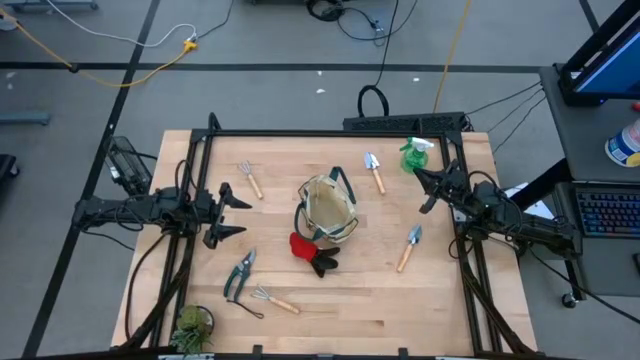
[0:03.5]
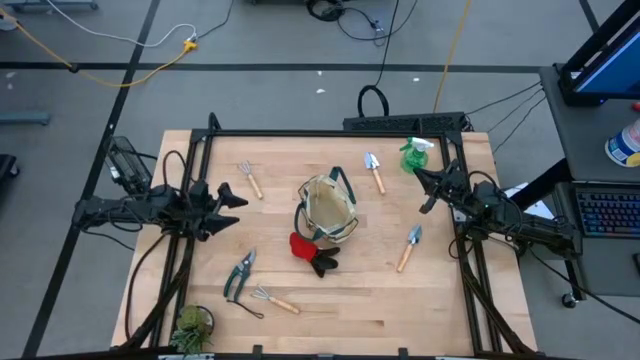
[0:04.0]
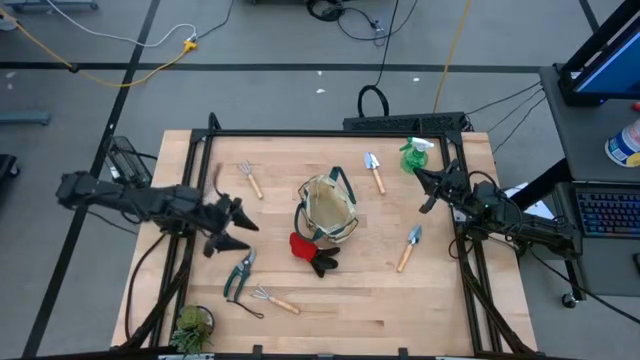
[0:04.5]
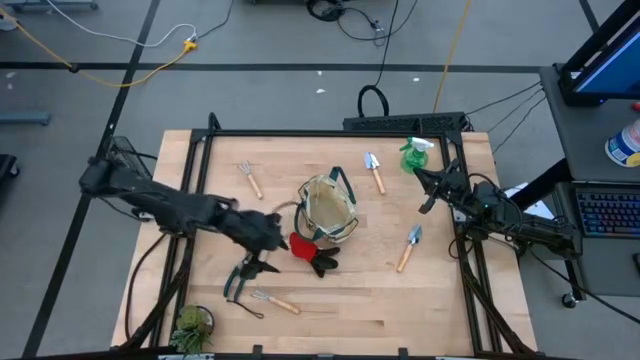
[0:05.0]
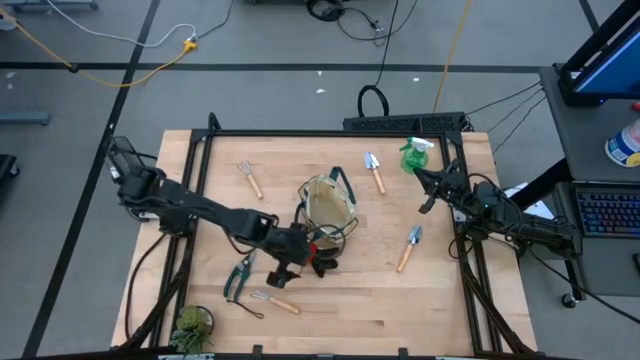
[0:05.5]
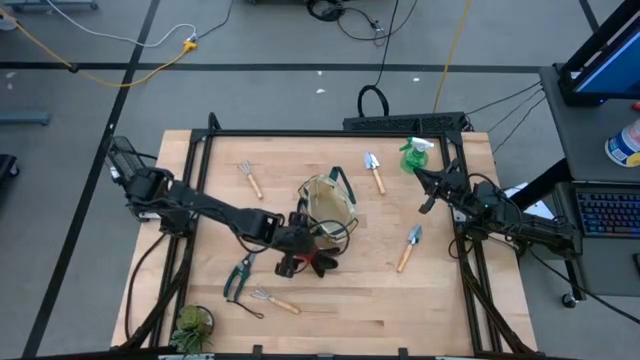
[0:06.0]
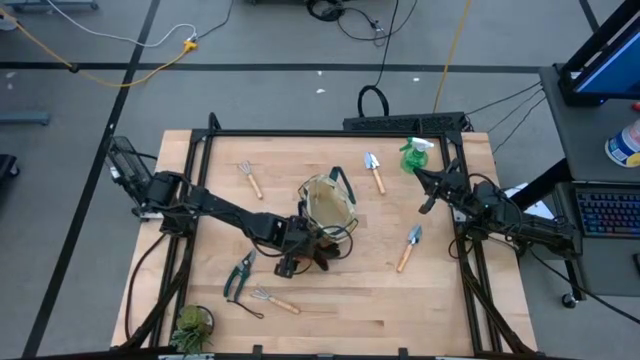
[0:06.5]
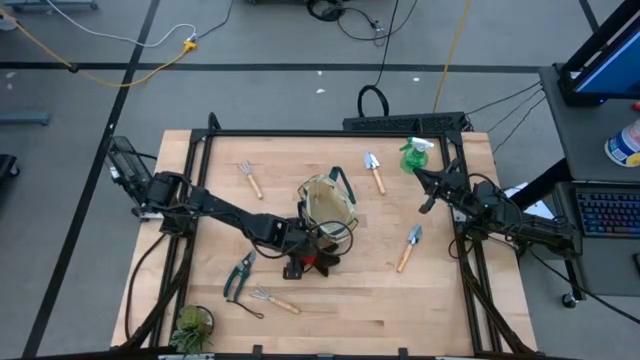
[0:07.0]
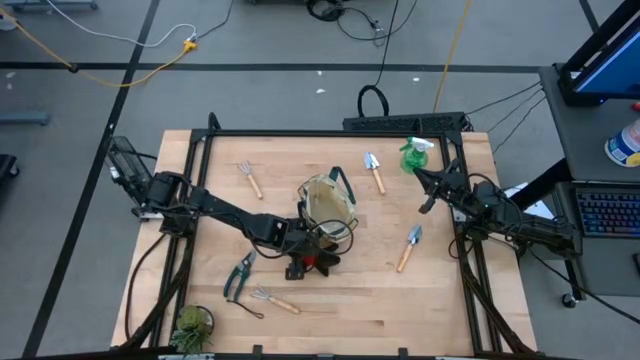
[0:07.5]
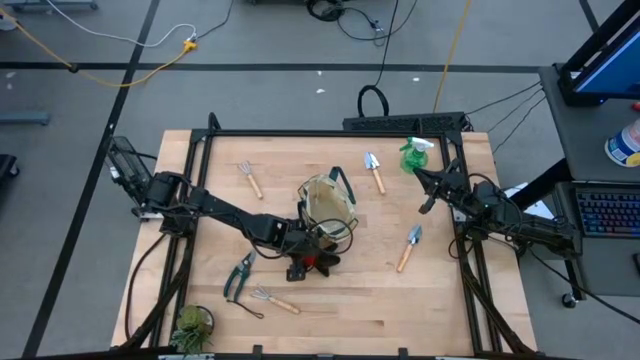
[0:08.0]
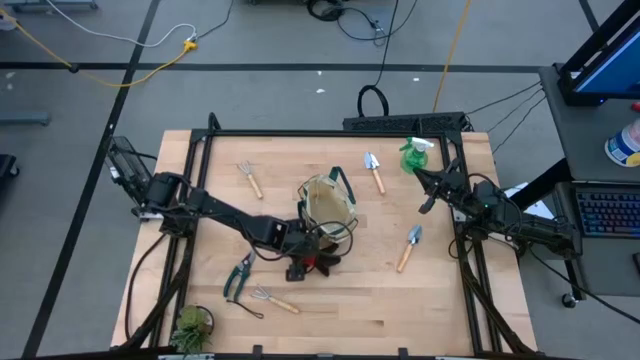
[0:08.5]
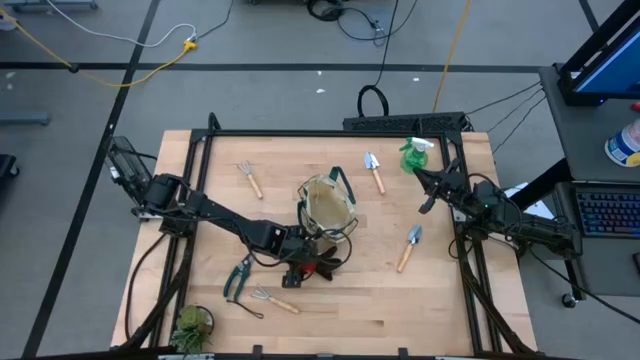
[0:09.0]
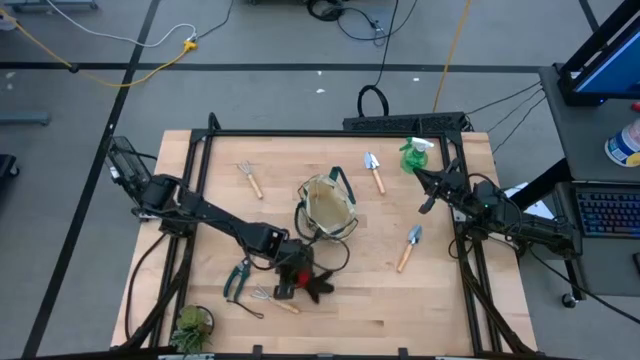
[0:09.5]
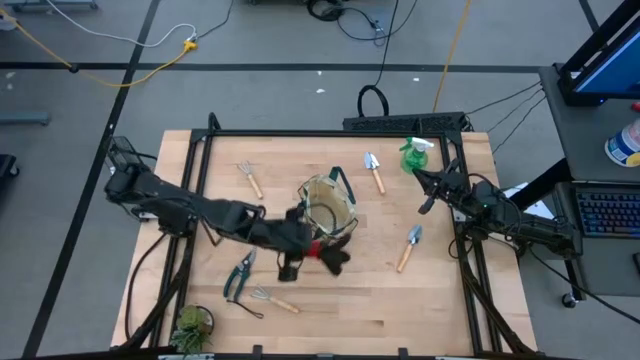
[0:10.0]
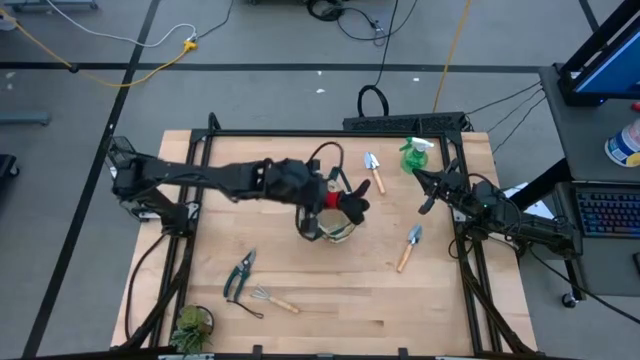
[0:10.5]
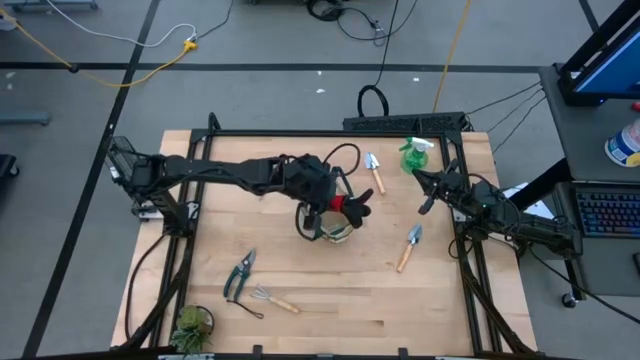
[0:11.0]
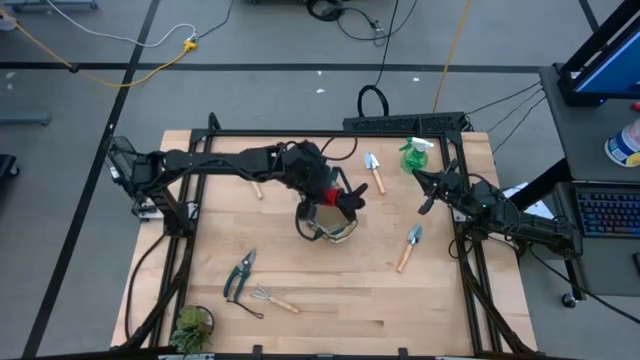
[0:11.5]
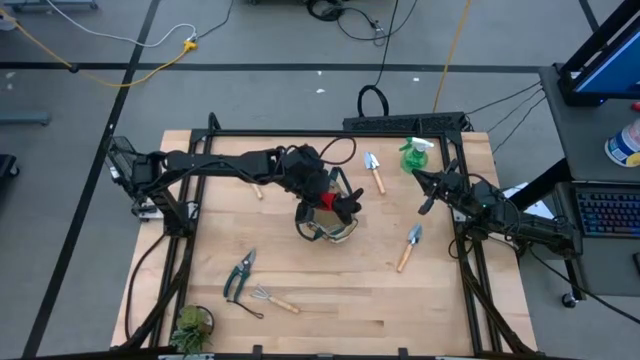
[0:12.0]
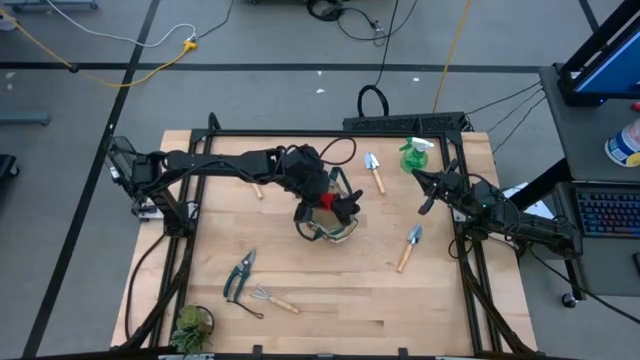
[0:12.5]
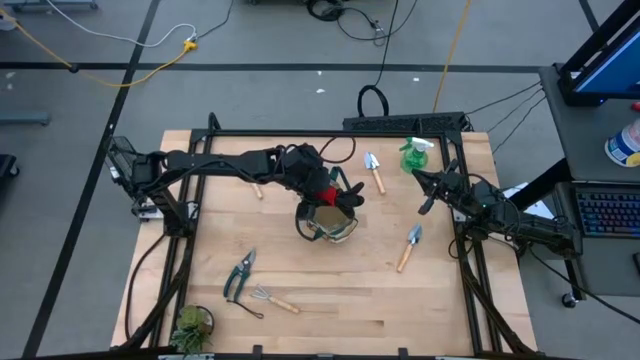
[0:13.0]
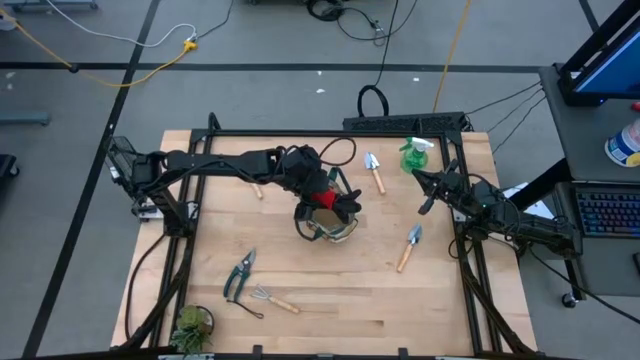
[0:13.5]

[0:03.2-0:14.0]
Task: Pick & Place Garden tools in Gardening bag
Put the gloves into the gardening bag

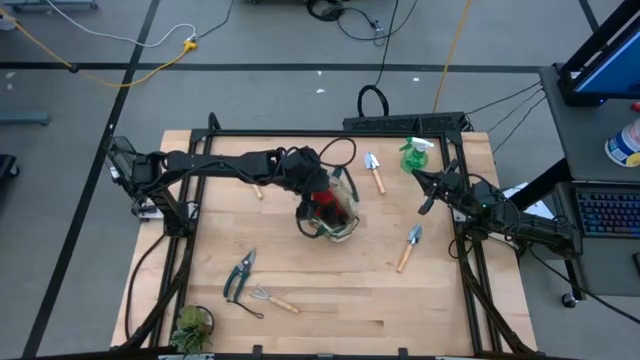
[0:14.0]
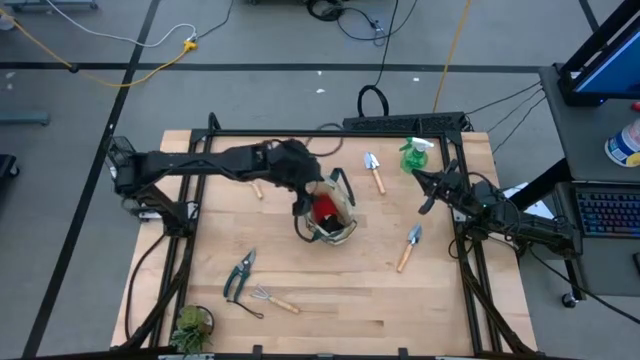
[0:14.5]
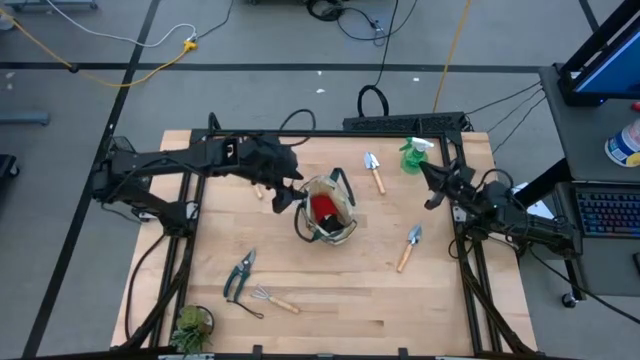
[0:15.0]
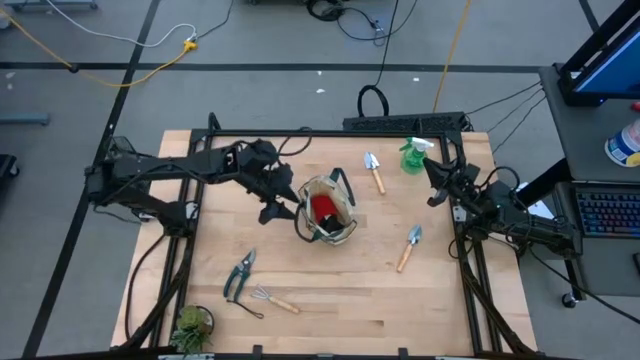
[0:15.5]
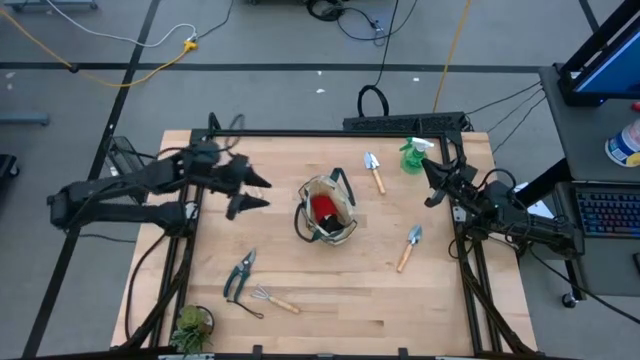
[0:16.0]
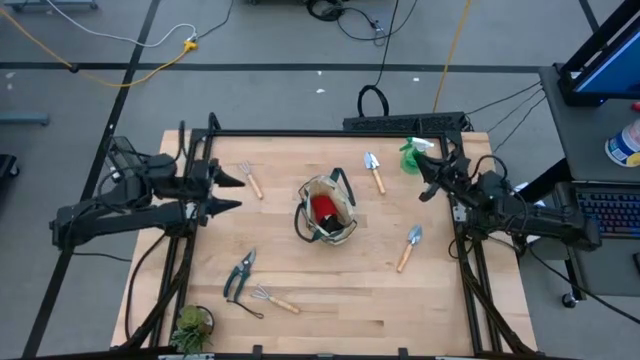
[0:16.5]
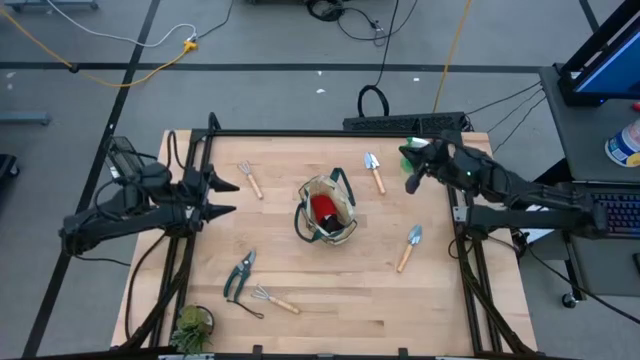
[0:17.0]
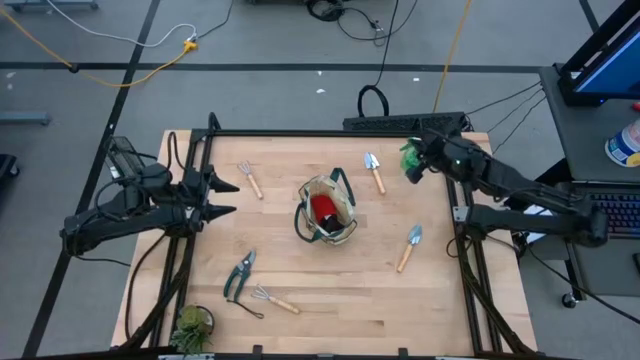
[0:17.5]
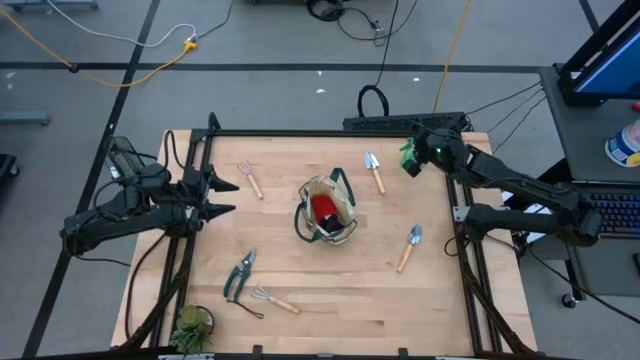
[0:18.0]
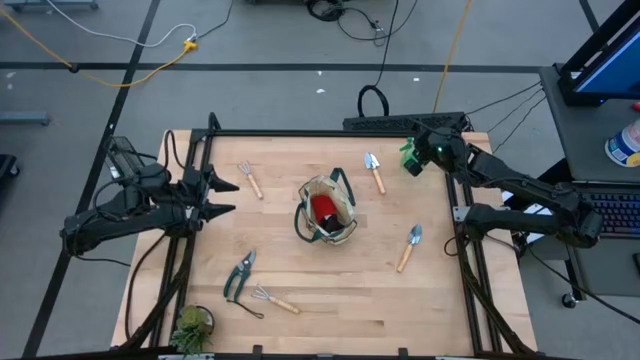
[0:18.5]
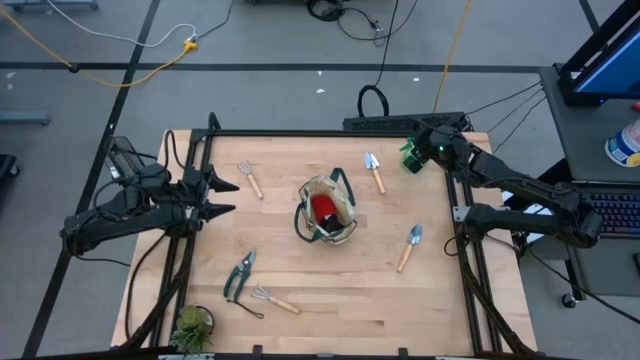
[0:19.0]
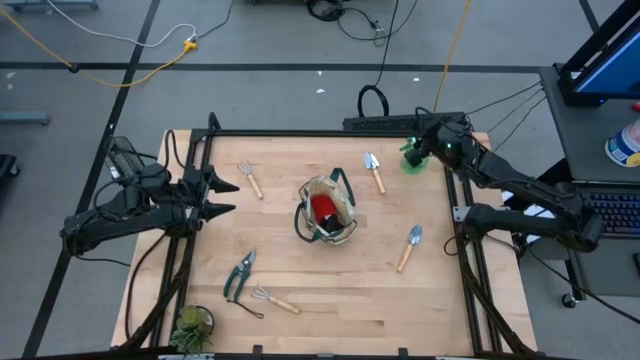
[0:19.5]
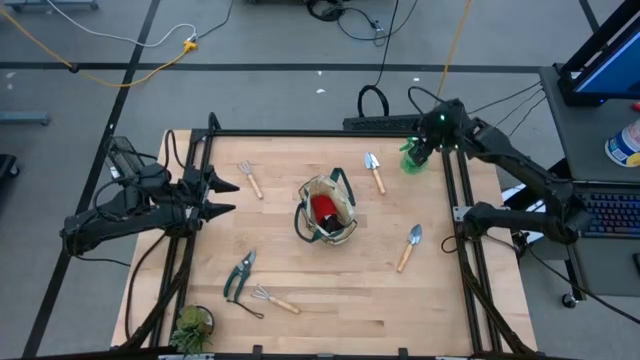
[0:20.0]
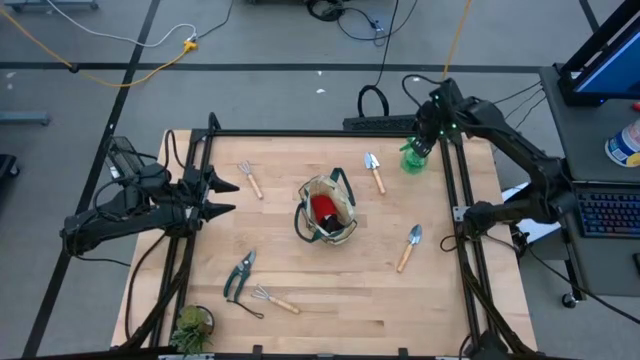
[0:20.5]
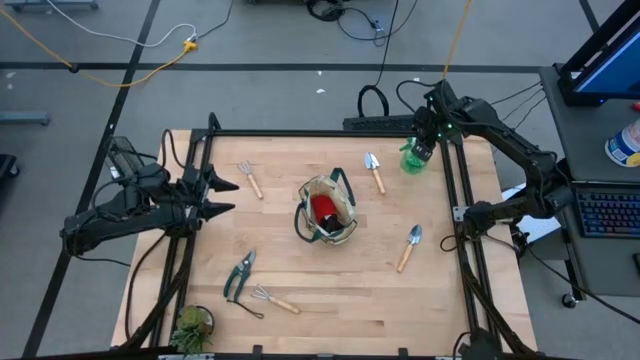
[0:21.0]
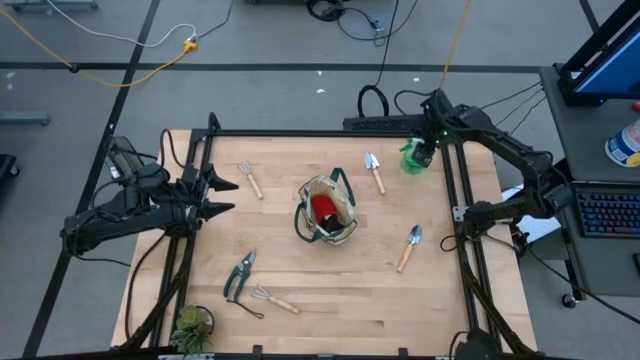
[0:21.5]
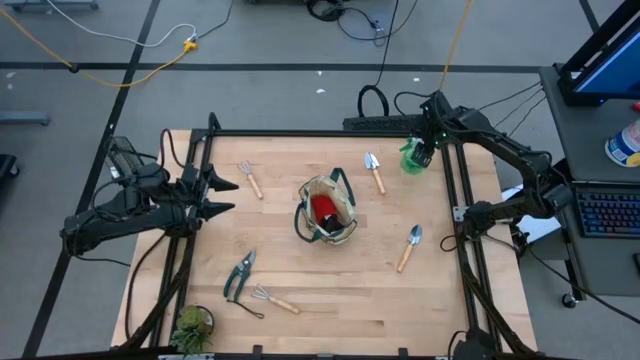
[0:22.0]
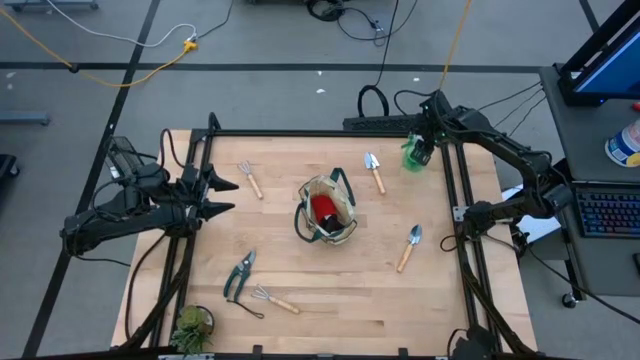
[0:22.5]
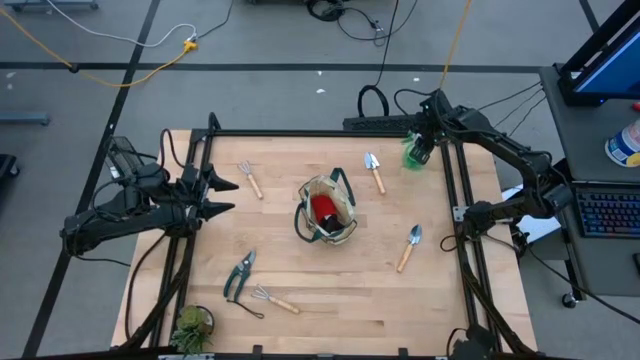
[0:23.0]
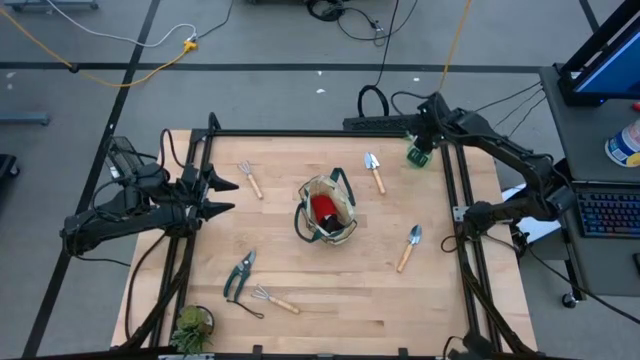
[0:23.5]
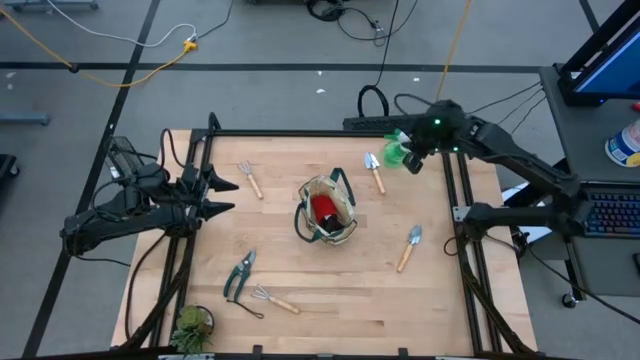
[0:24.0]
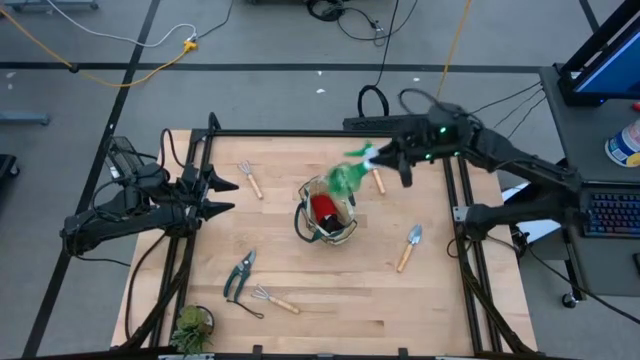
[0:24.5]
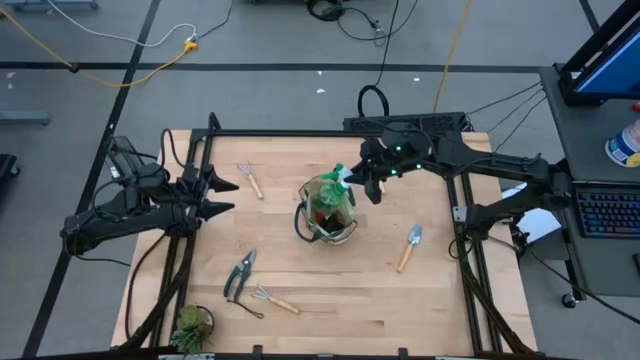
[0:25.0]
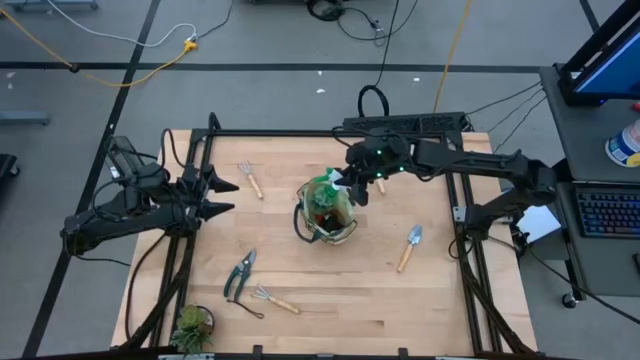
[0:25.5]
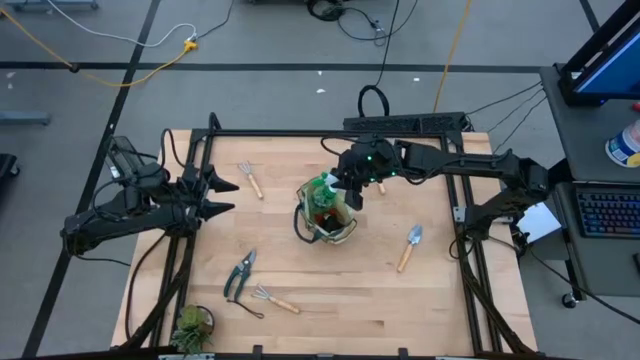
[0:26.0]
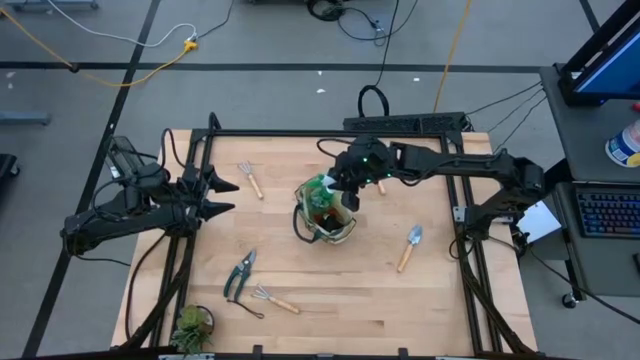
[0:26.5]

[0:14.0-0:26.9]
Put the spray bottle into the gardening bag
